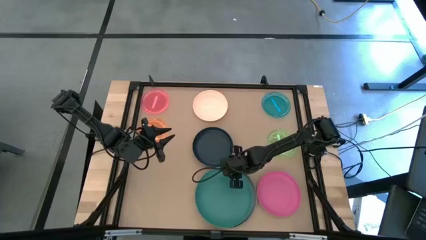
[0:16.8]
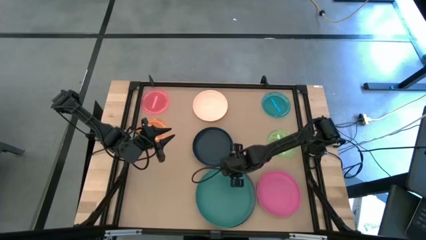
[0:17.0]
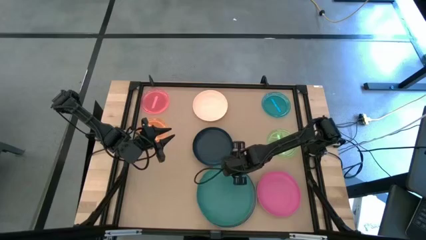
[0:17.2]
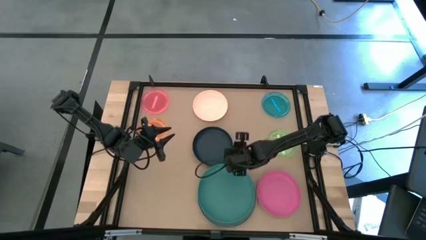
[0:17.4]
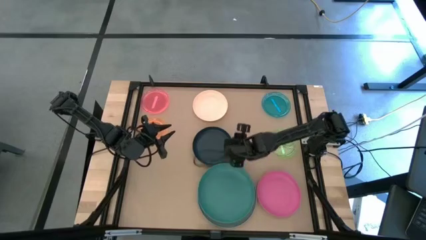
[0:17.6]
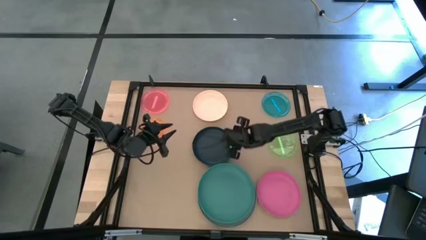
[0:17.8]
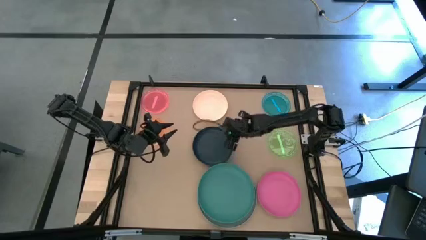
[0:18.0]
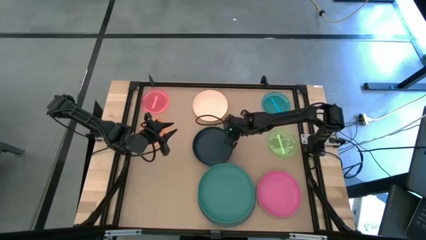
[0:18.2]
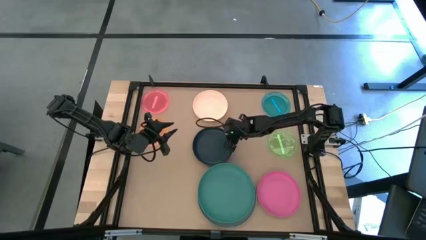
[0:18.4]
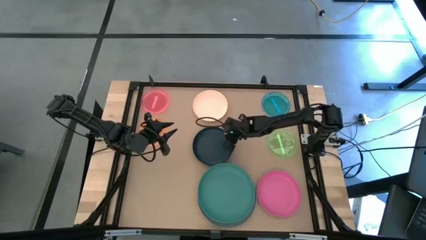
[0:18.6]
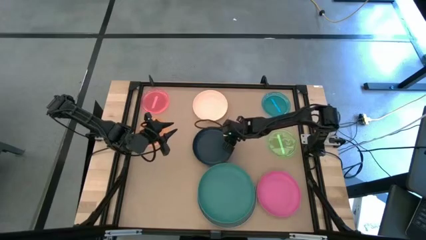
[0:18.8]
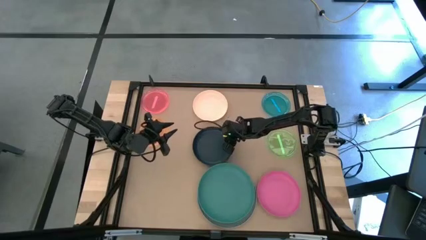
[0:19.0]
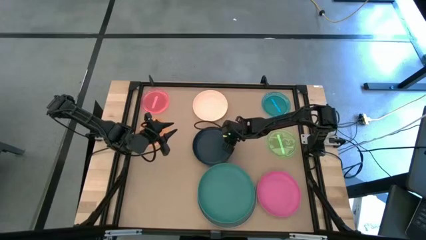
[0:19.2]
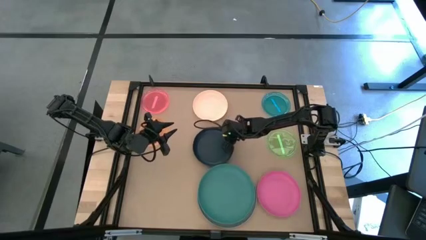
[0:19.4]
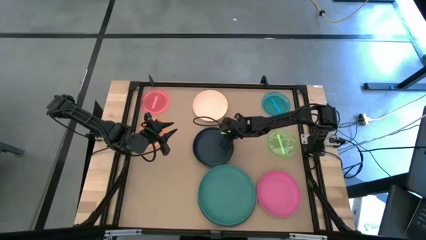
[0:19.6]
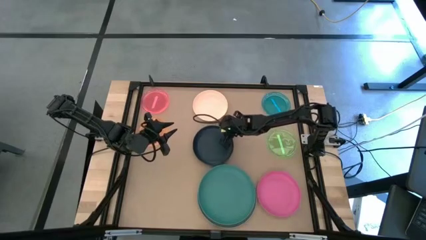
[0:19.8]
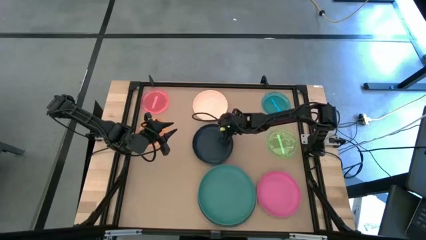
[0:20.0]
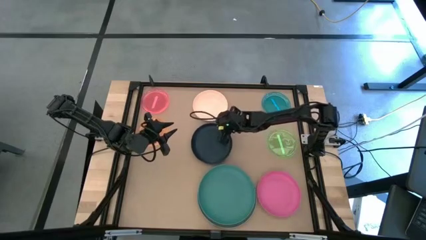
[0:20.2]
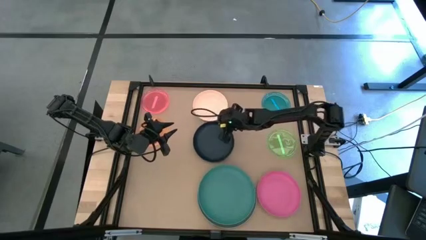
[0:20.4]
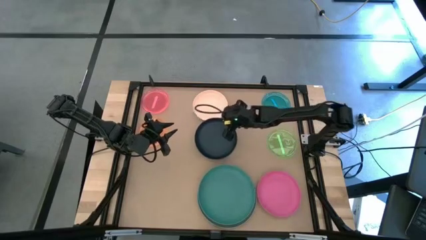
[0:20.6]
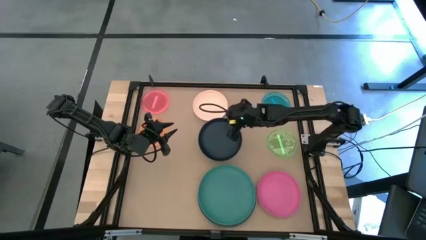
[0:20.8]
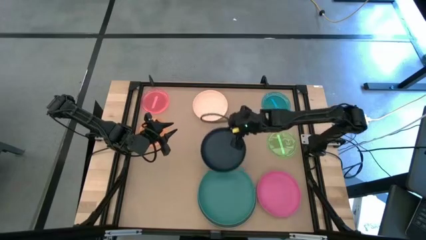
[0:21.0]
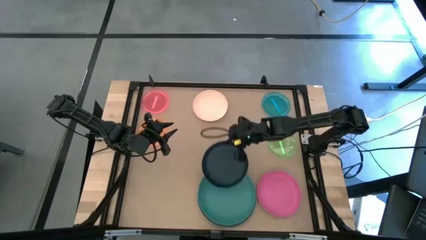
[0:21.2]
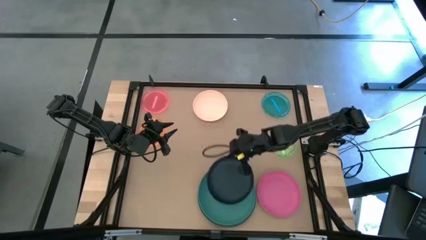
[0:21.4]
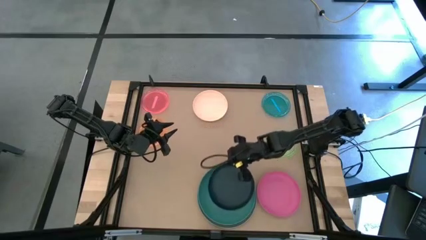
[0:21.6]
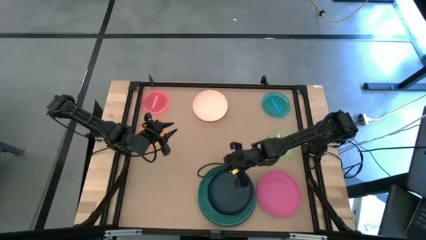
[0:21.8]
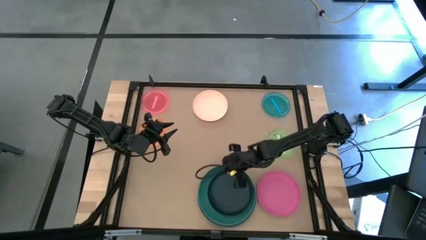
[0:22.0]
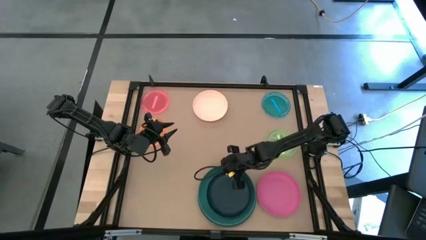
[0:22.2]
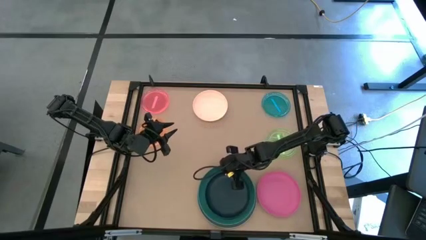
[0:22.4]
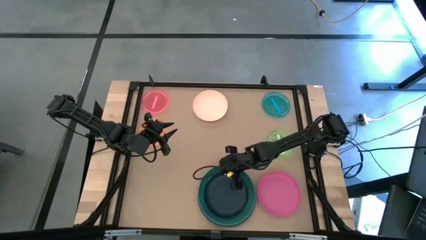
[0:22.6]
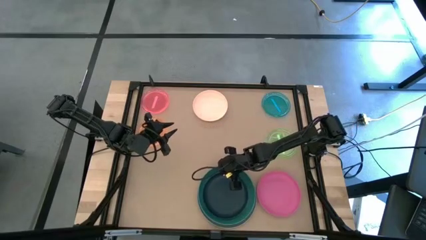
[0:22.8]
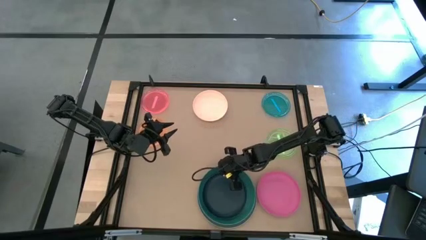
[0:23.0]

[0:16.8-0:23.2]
Task: Stack plastic plates
Stack the dark blue plate on top of the large green plate

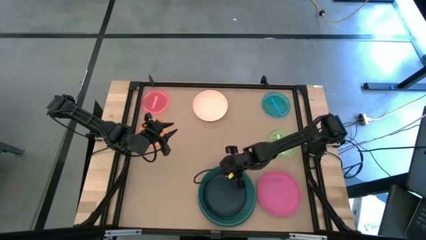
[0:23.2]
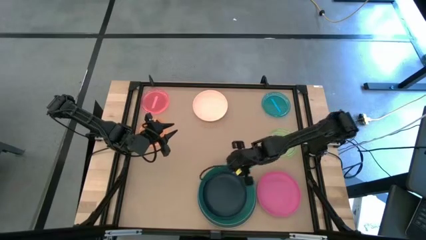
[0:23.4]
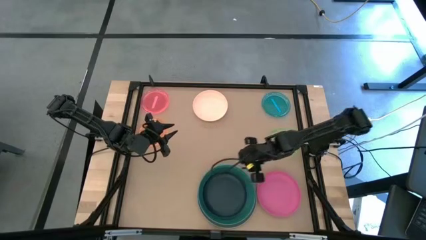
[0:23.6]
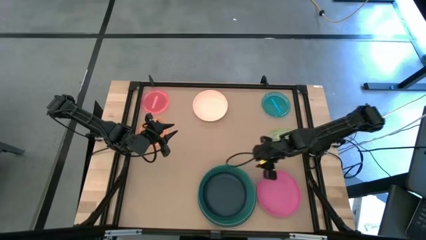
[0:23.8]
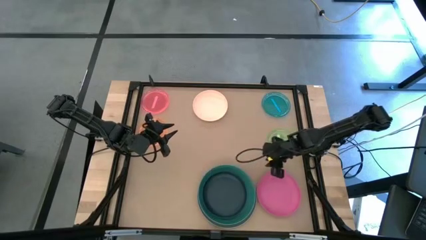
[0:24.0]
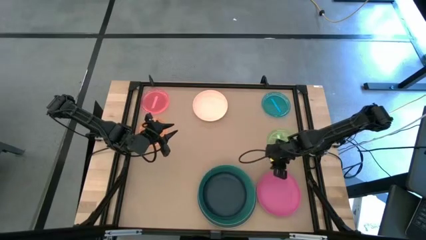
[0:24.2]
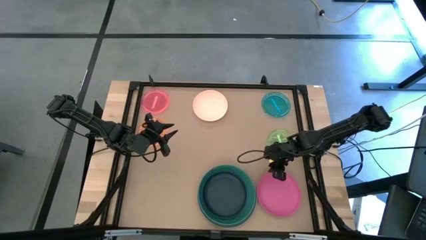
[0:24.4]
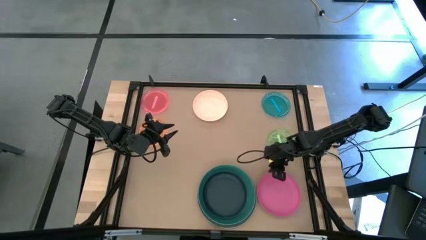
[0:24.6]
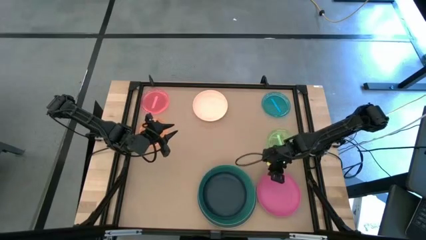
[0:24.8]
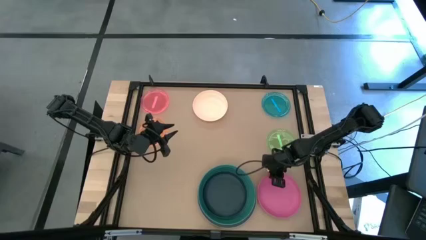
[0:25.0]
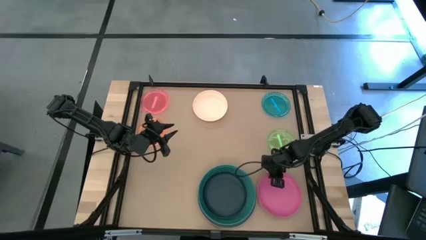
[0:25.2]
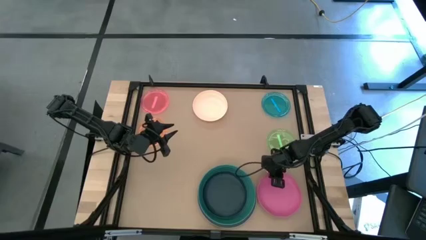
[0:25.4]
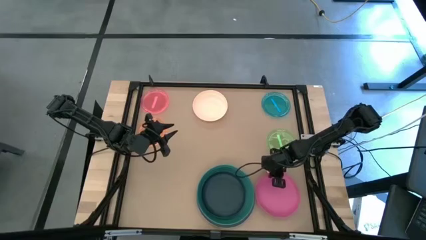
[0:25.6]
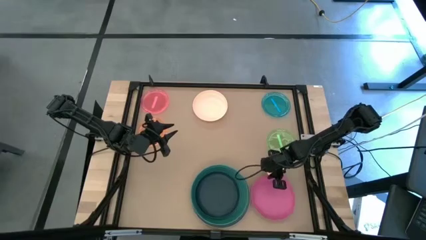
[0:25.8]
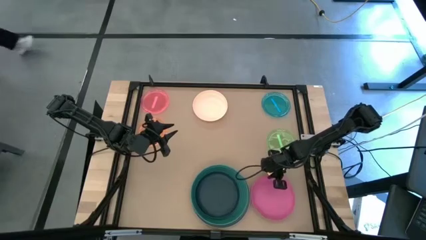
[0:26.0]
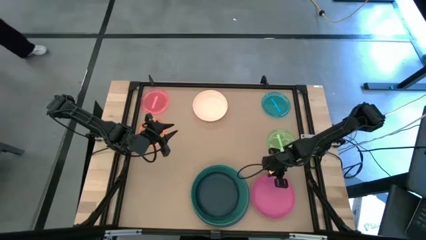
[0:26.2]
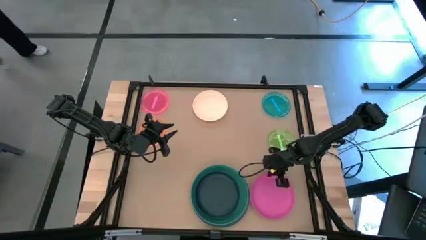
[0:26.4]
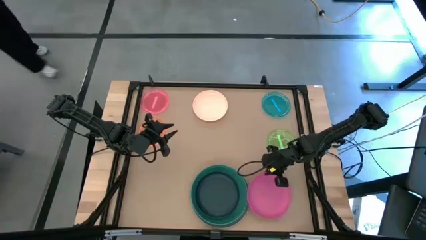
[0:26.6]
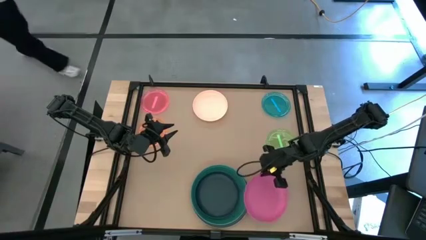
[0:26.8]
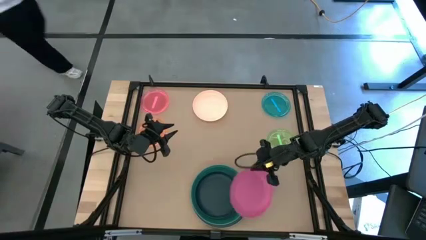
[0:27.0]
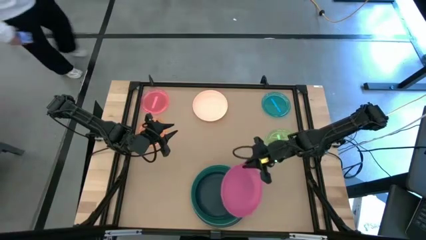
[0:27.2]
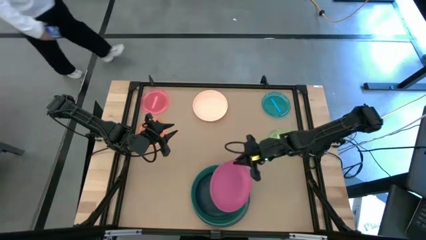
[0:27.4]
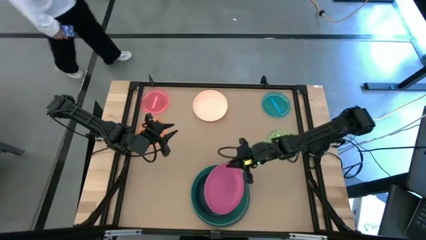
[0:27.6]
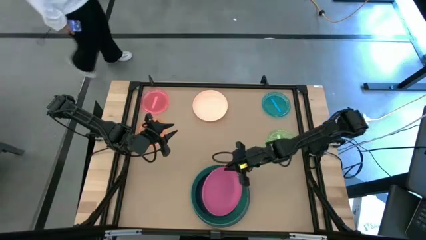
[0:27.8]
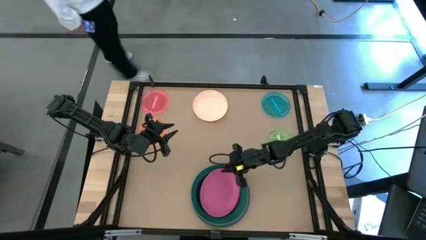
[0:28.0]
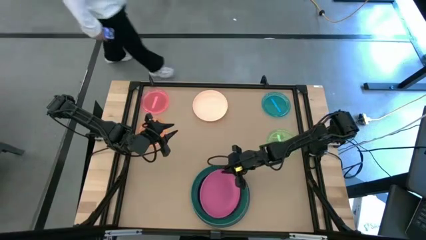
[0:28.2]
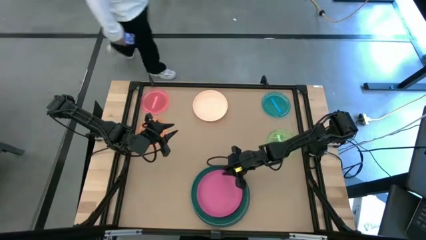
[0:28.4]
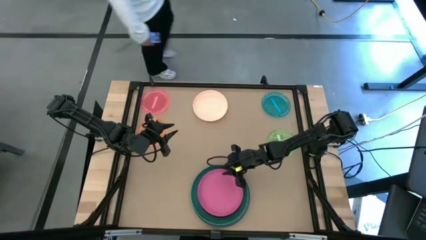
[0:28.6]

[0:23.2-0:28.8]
Stack the pink plate on top of the dark blue plate

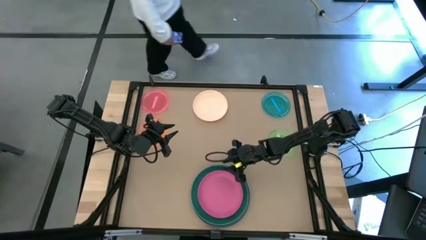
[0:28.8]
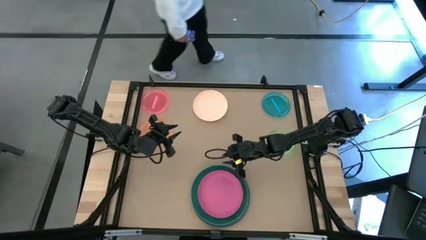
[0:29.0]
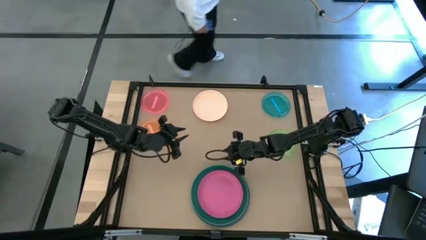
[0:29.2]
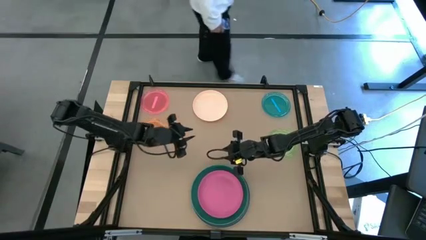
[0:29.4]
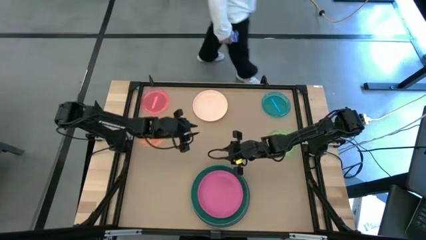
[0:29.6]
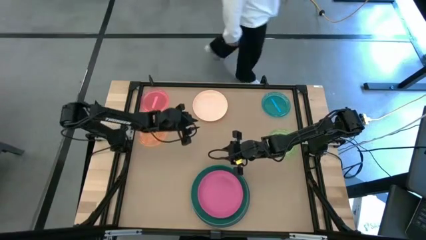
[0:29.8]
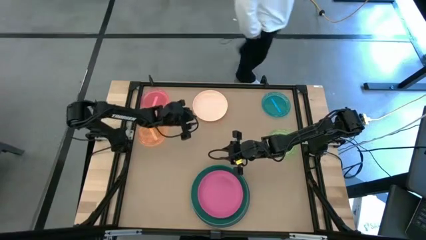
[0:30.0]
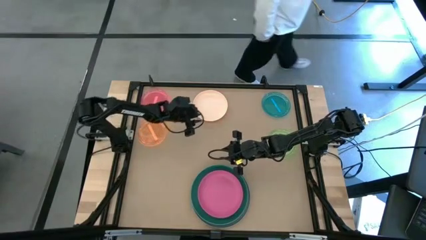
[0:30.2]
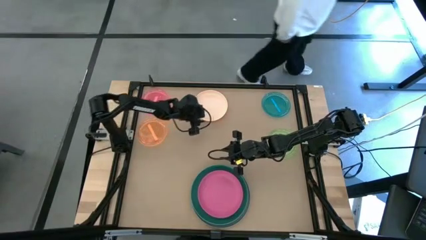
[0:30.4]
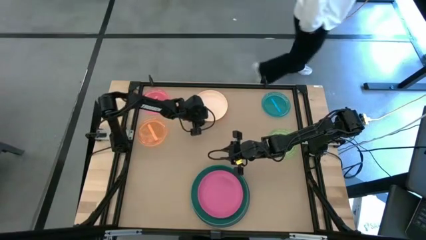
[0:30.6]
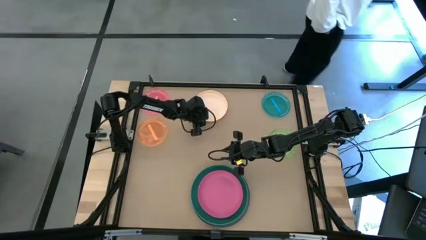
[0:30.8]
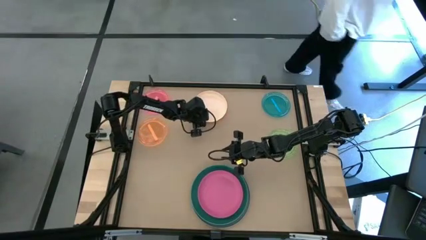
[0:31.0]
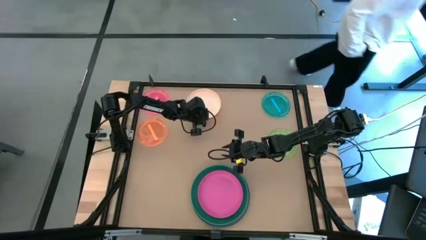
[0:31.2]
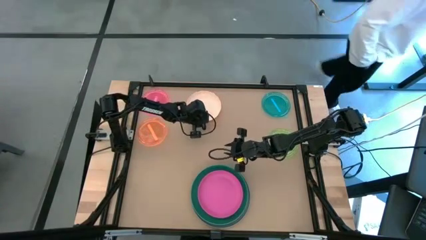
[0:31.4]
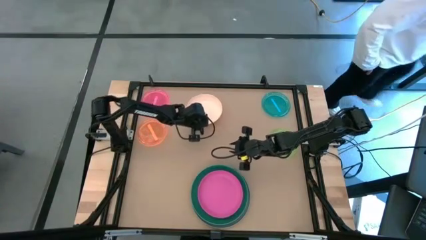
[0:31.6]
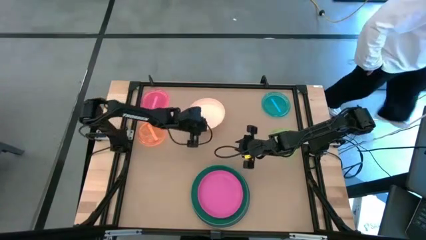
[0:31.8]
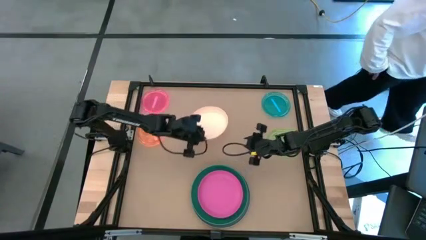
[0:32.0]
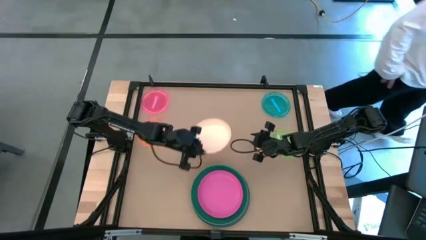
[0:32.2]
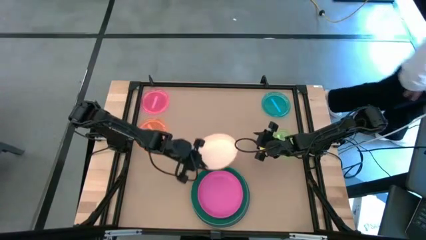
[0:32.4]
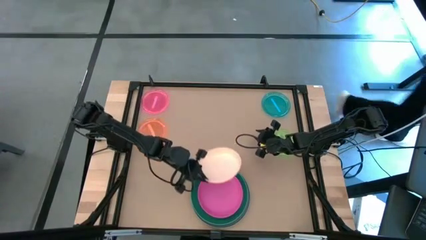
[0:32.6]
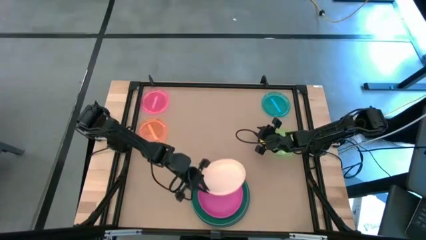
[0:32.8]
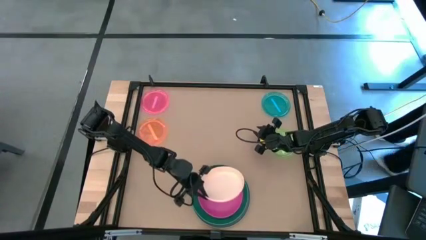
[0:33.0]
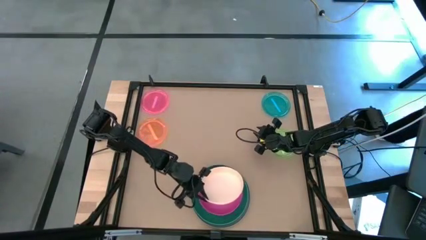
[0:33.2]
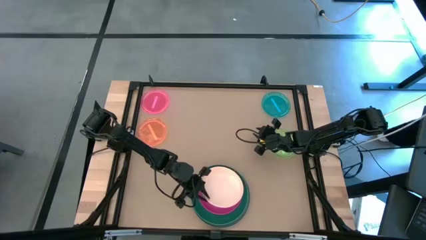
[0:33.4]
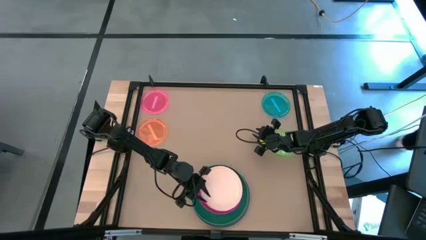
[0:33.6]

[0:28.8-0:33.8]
Stack the light orange plate on top of the pink plate

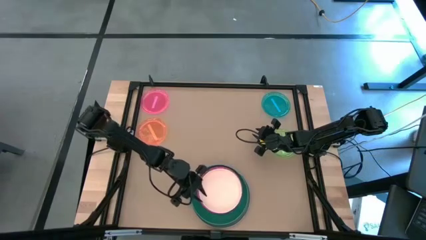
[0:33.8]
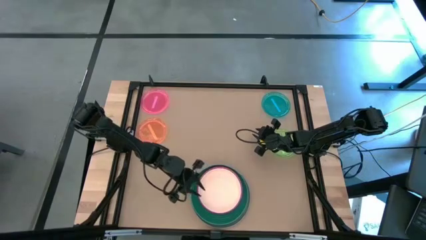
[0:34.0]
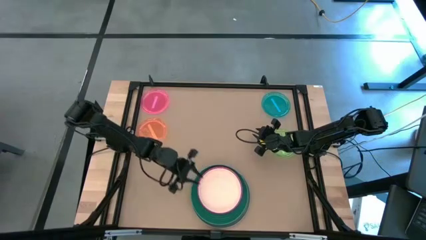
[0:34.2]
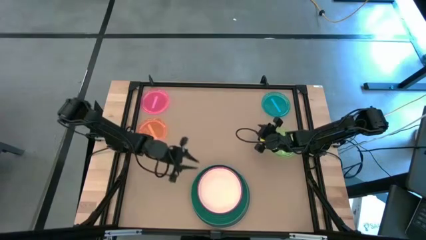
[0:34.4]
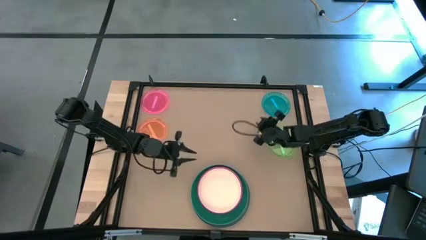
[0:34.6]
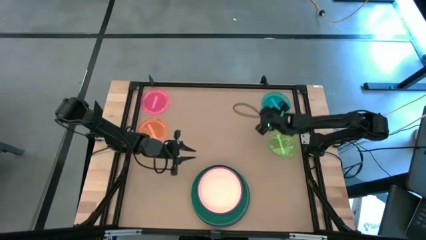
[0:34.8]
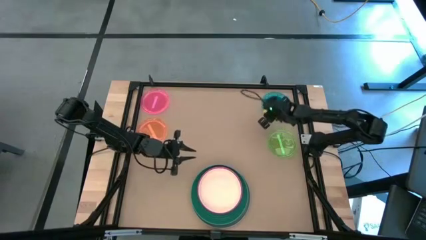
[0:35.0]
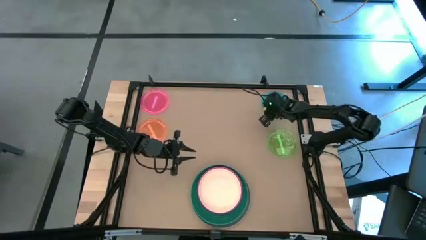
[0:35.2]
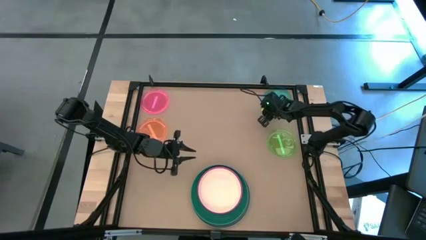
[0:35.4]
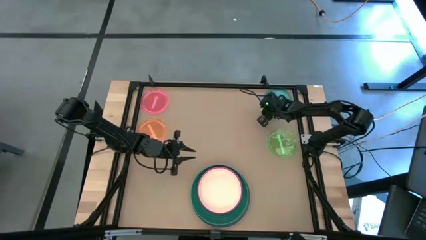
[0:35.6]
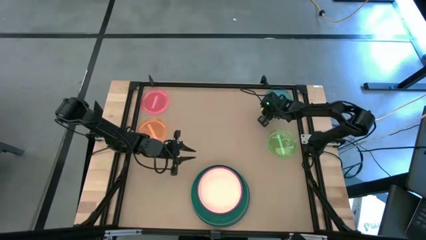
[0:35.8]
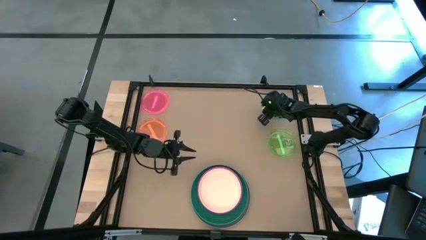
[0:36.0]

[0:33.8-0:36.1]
Stack the small blue plate on top of the light yellow plate
